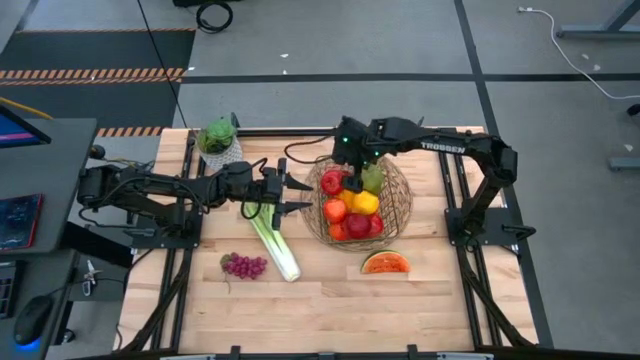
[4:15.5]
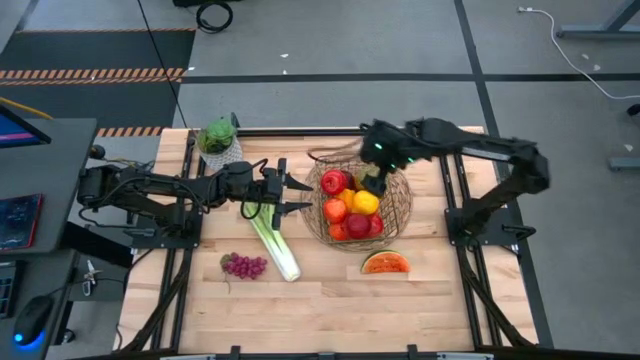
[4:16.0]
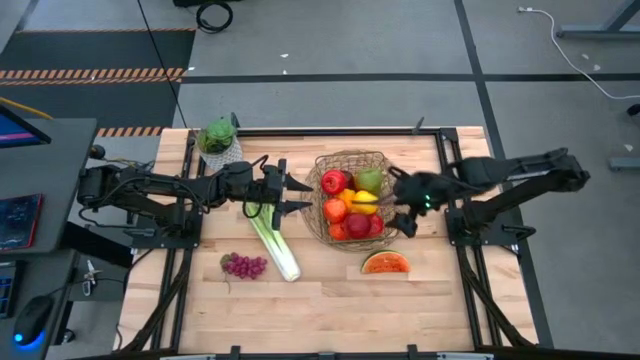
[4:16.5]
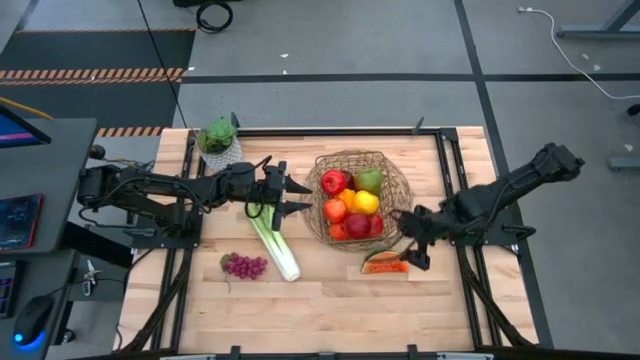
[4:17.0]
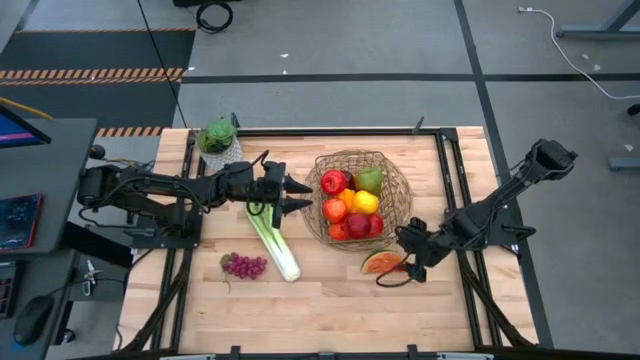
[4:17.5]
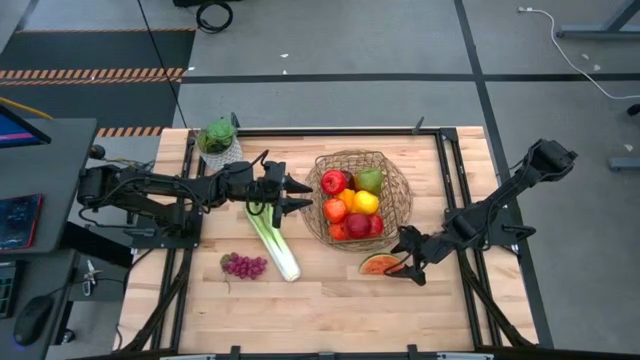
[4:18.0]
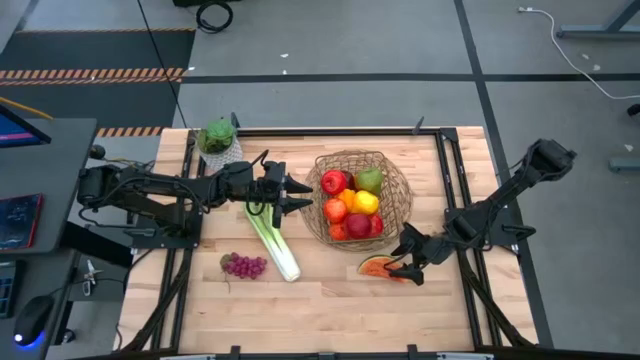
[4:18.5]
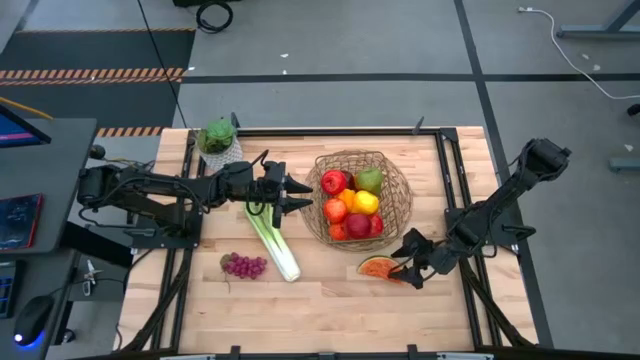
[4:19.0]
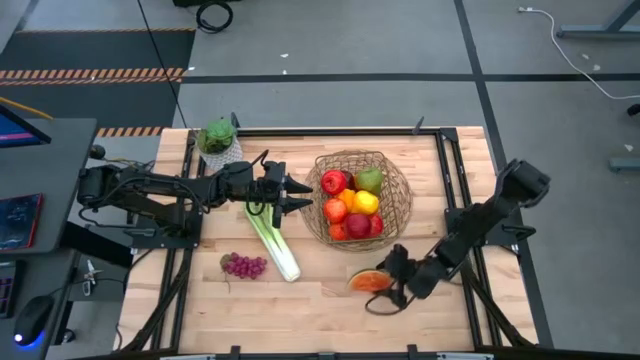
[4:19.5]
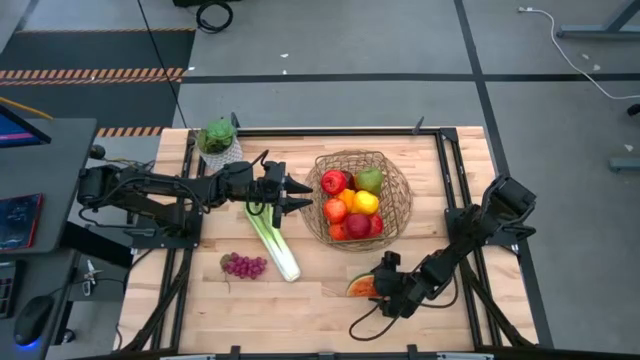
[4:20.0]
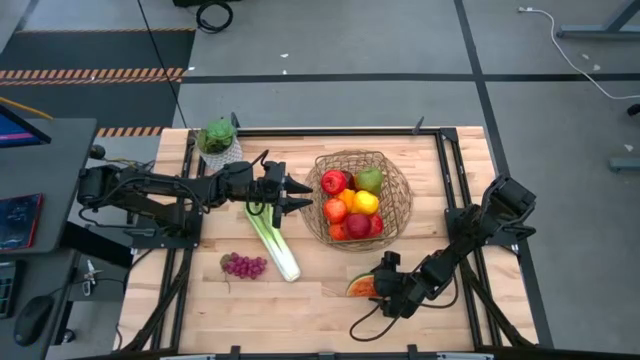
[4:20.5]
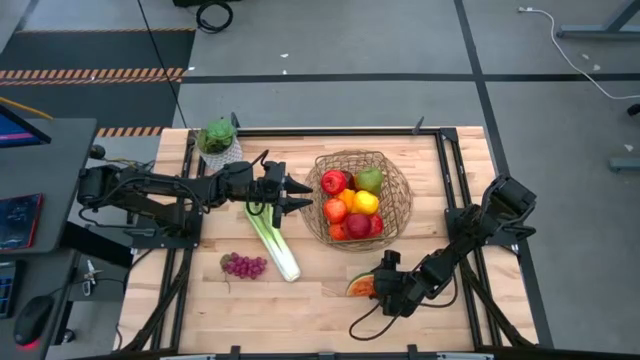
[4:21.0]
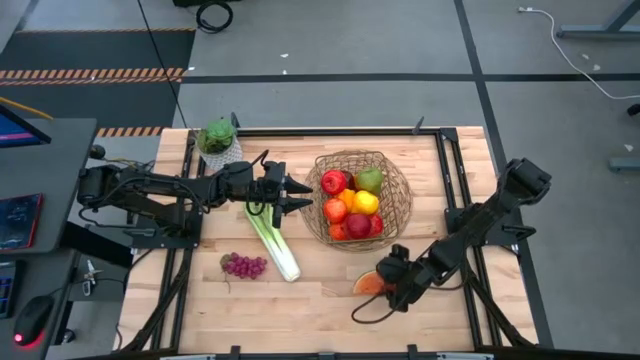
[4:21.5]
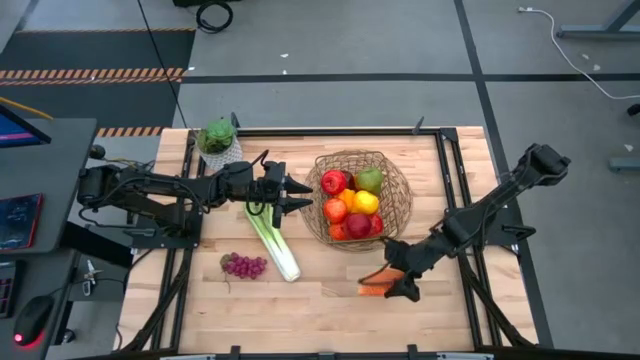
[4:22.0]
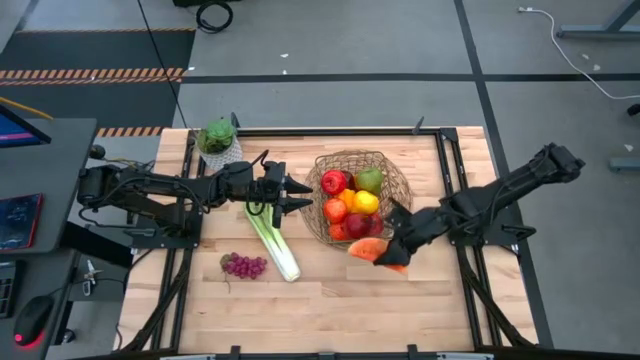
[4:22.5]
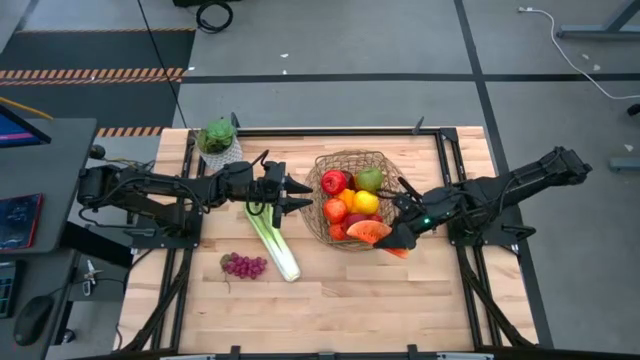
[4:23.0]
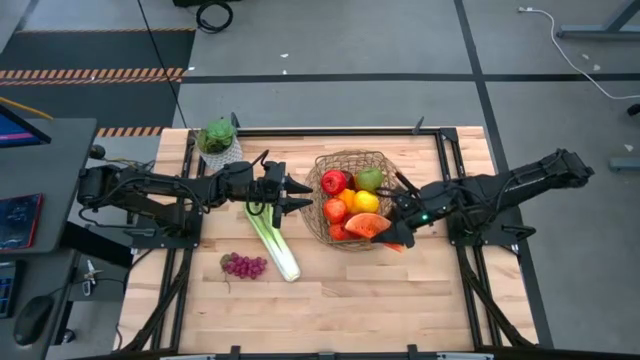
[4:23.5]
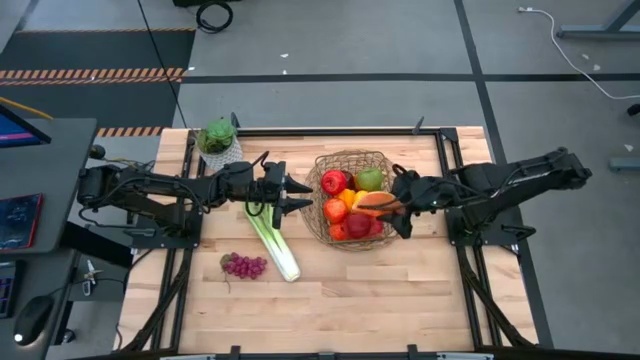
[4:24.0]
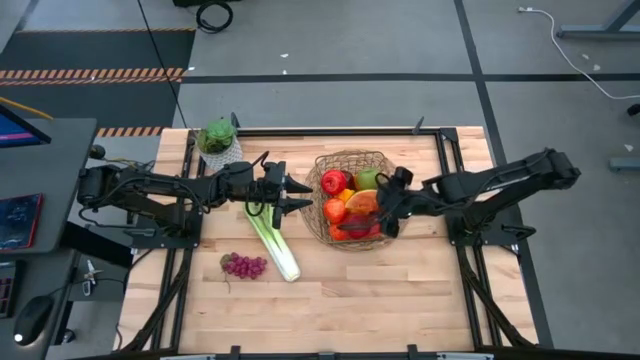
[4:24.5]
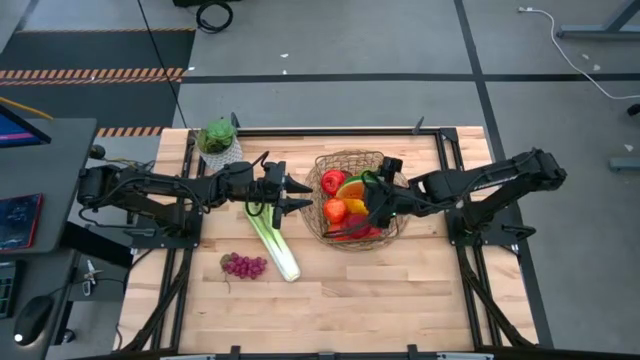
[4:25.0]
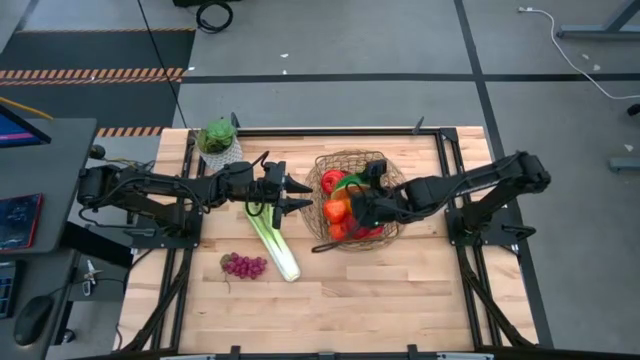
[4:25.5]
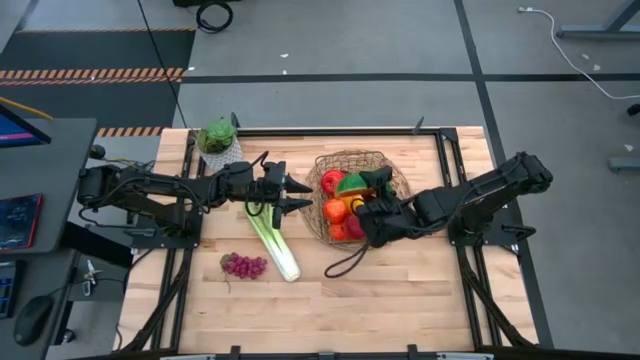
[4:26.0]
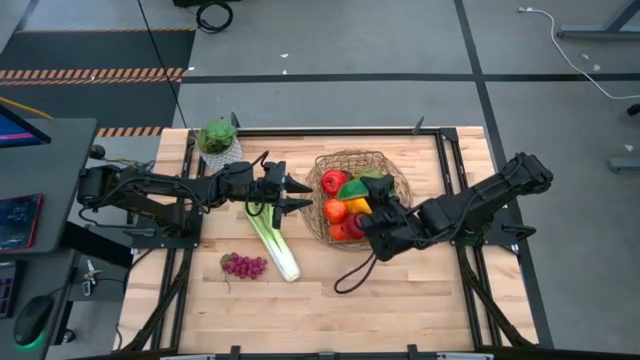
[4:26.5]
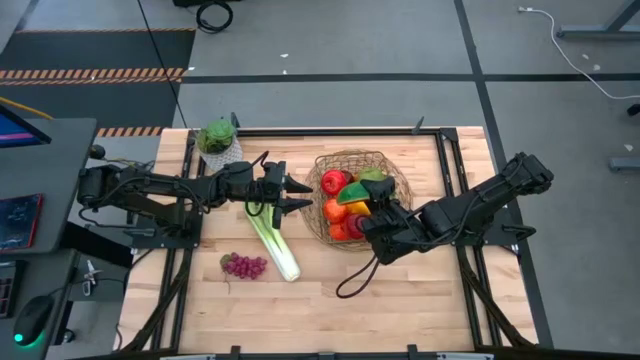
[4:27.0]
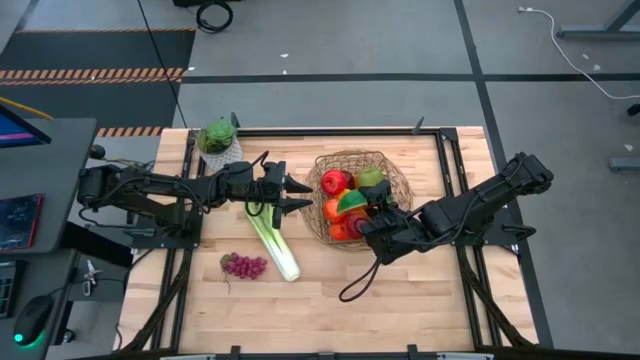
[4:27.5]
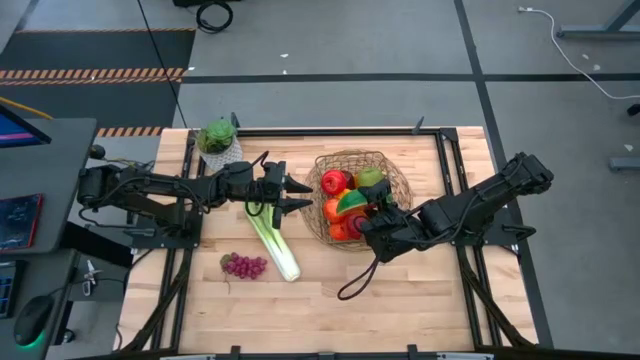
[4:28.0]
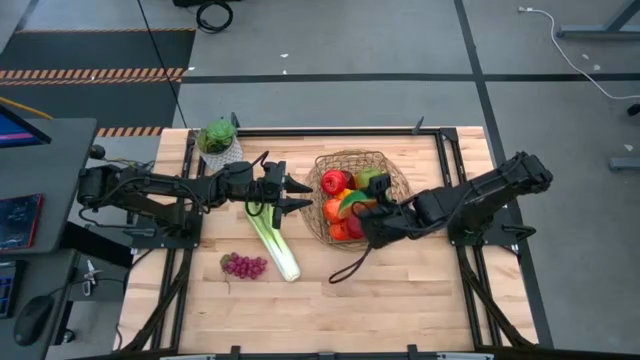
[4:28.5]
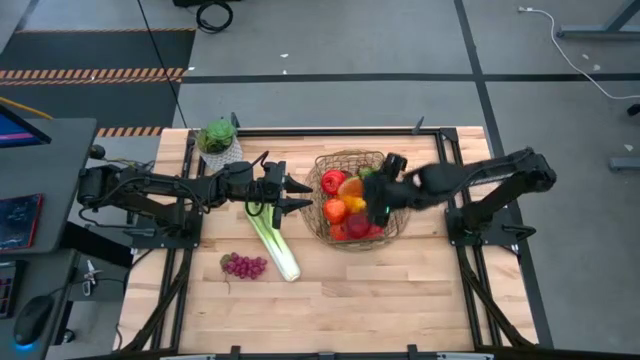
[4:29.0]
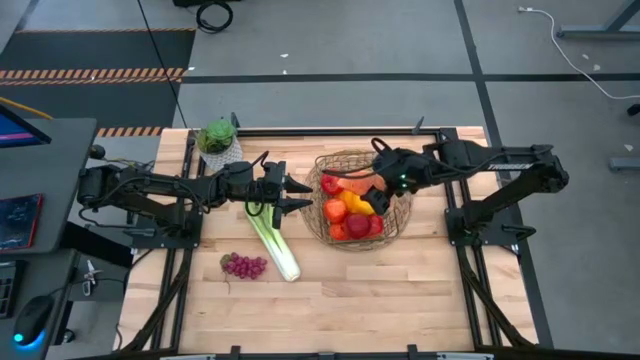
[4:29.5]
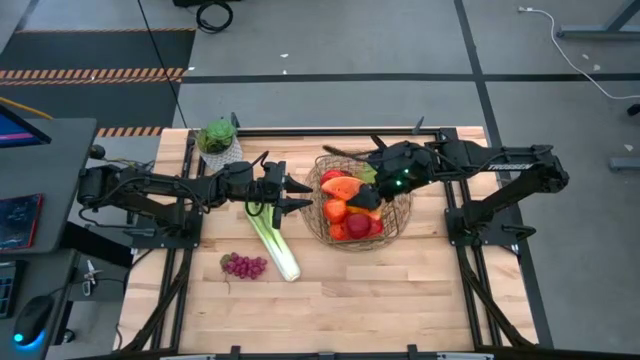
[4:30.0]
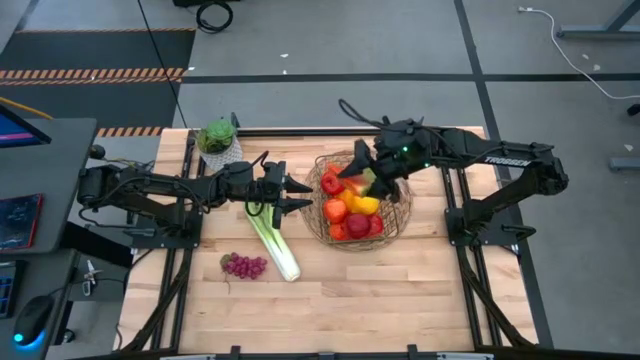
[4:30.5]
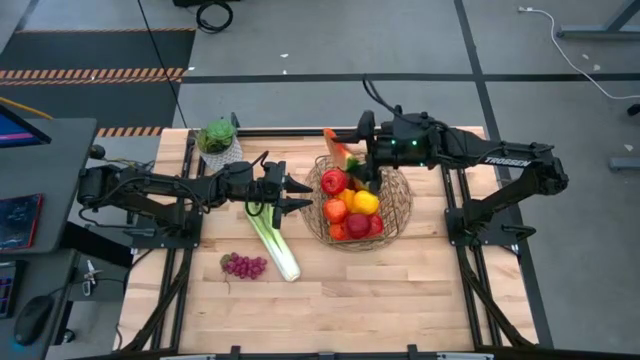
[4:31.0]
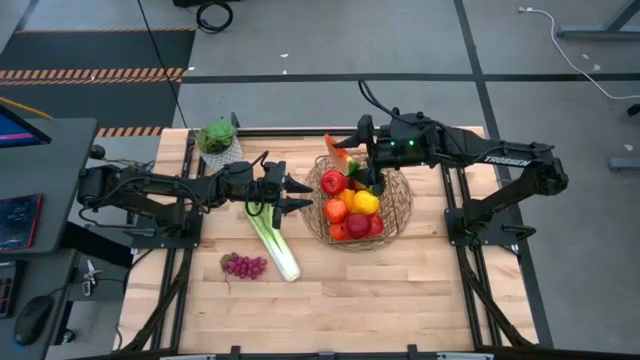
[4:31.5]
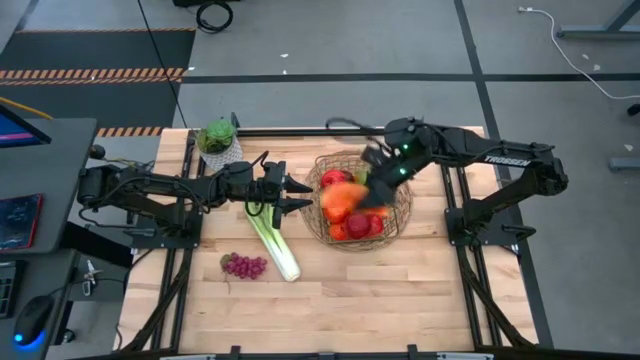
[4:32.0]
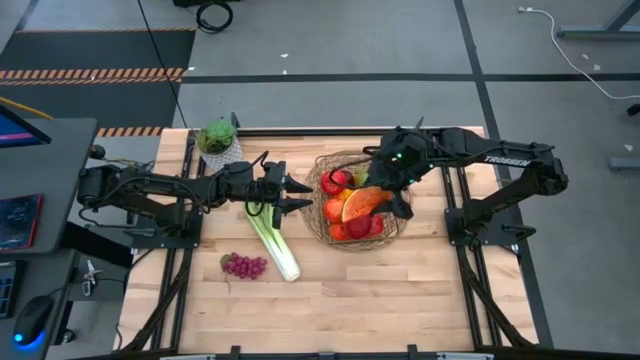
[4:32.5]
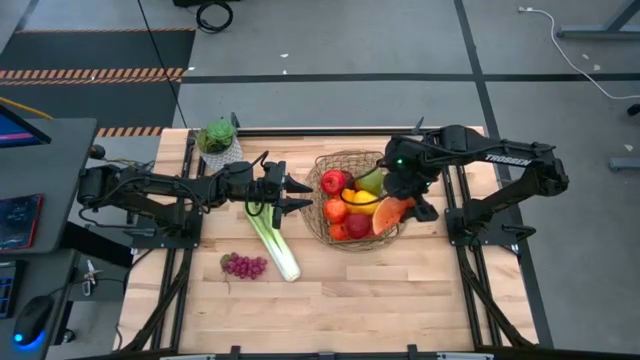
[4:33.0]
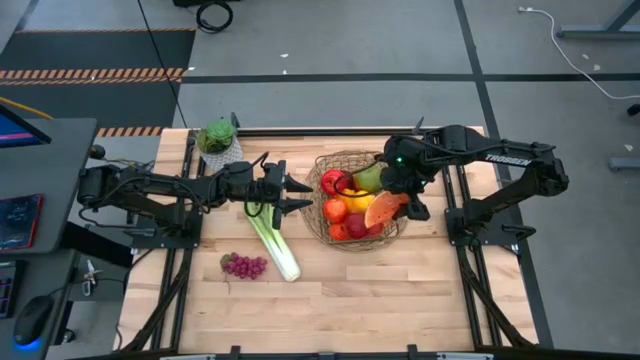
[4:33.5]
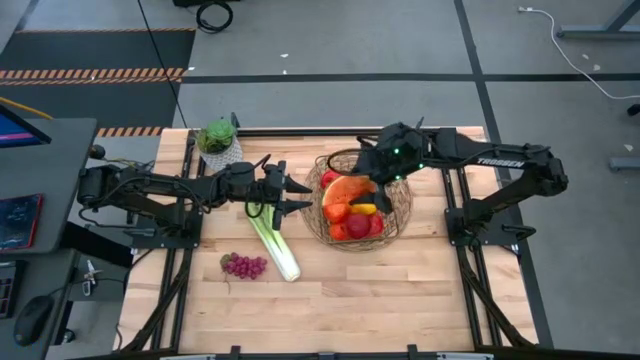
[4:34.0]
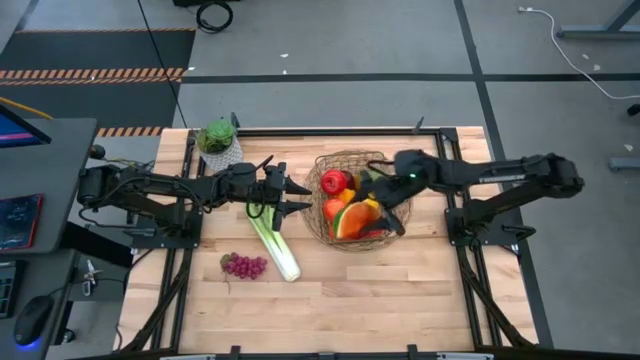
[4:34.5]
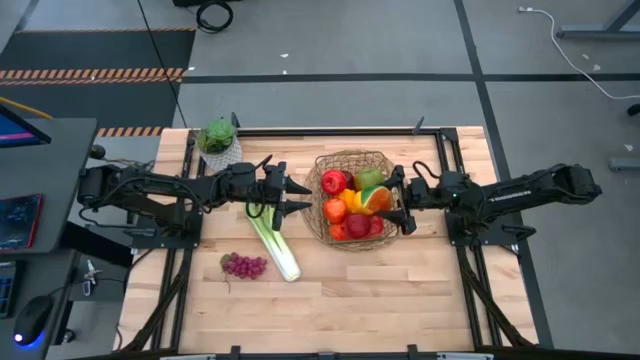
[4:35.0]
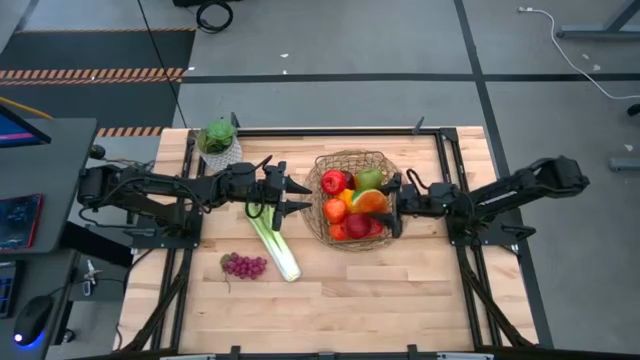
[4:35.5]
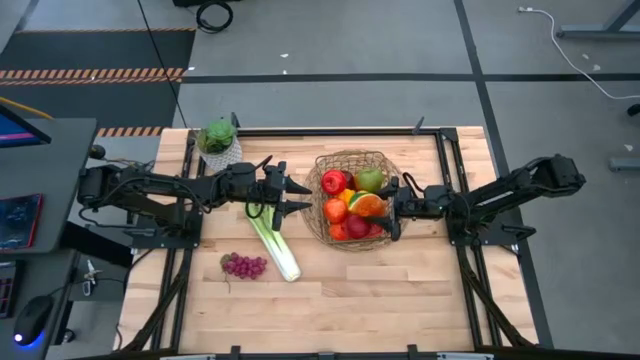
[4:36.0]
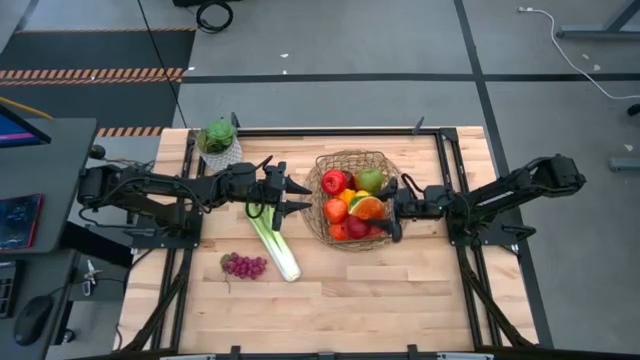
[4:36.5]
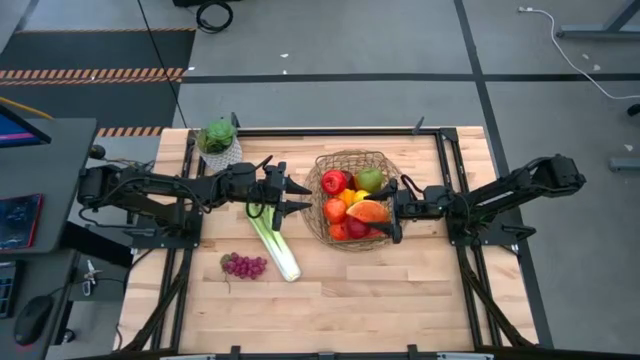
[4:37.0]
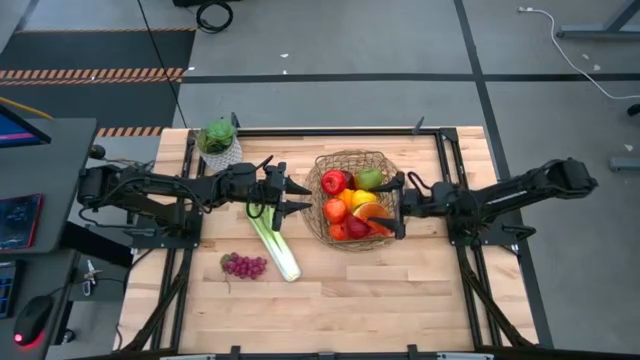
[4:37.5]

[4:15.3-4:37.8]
Task: Build produce basket
Put the green watermelon into the brown wire basket
